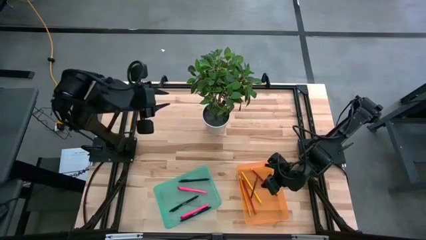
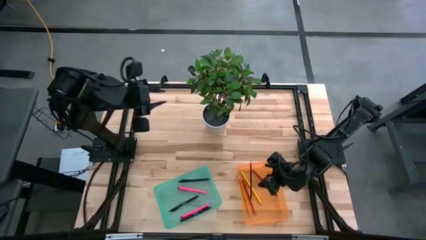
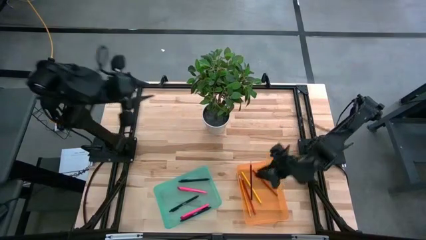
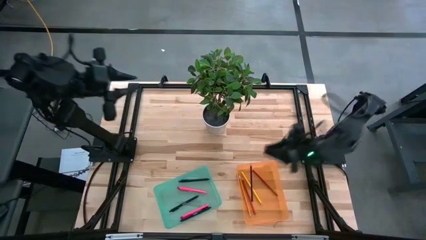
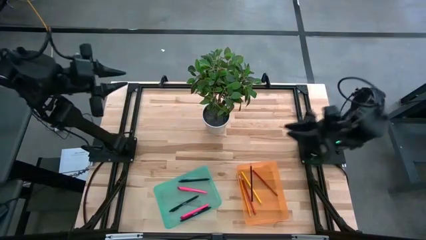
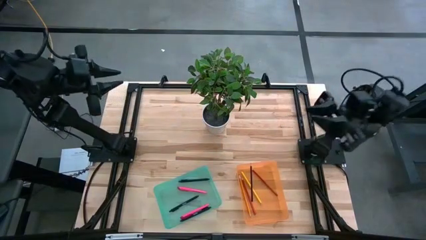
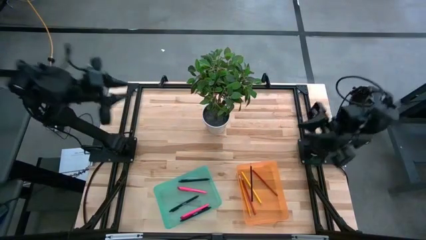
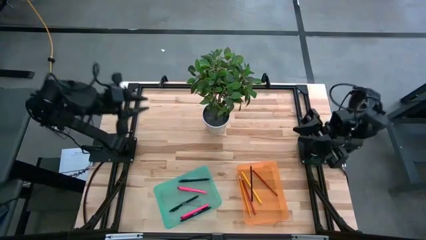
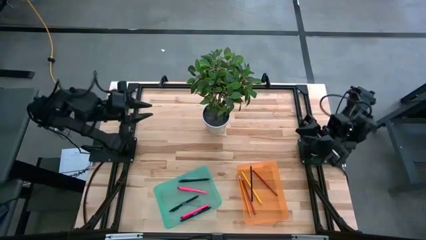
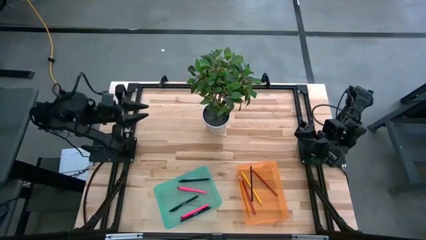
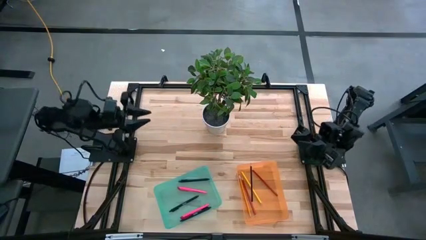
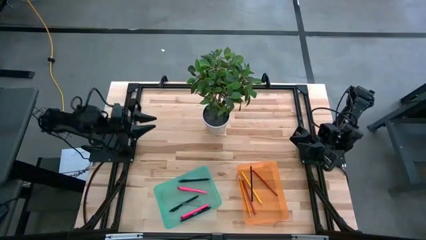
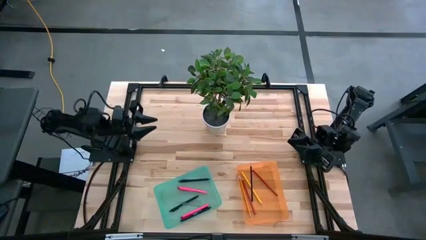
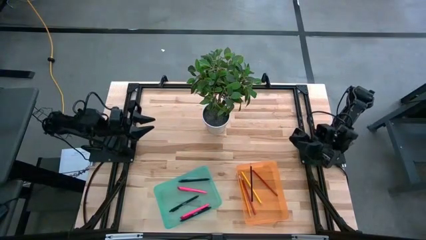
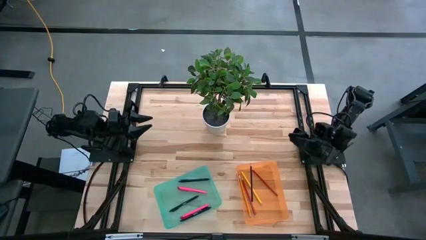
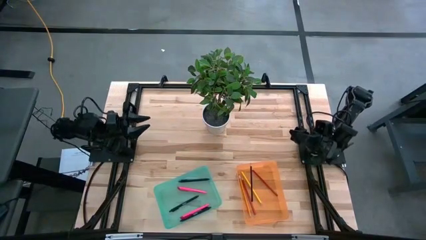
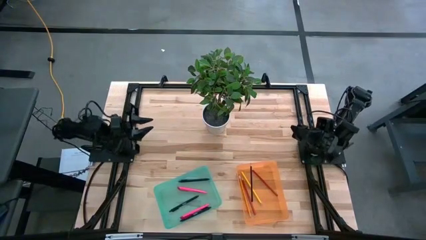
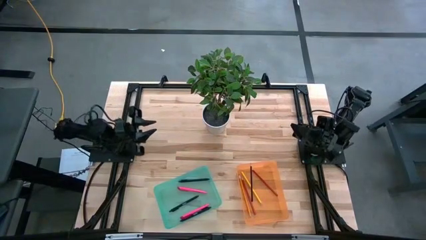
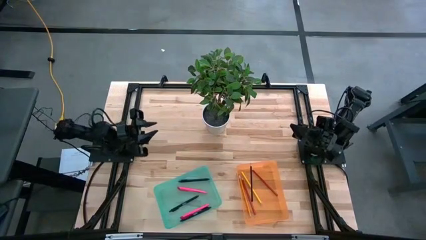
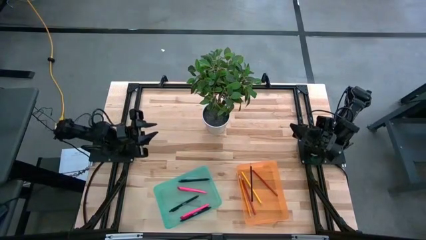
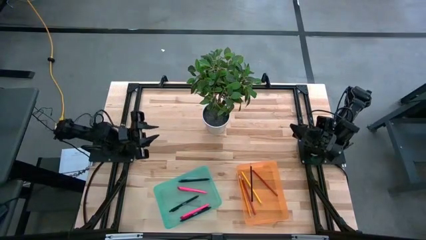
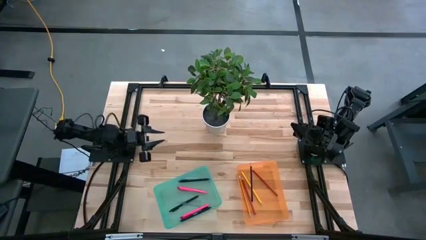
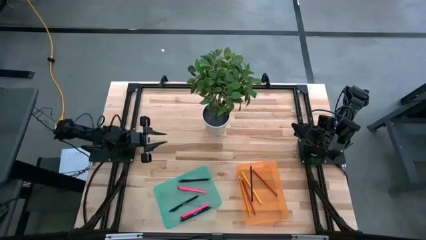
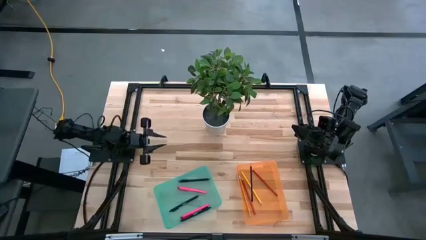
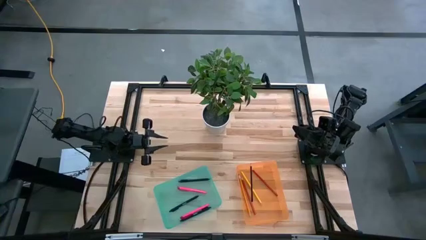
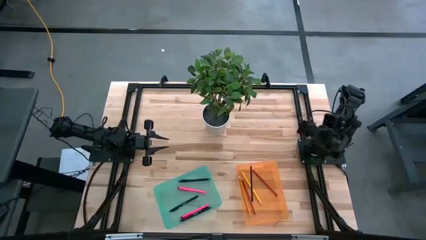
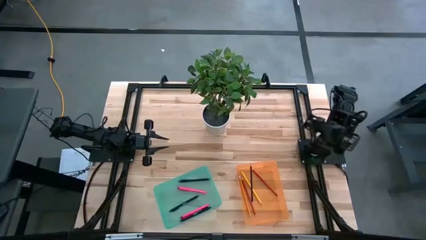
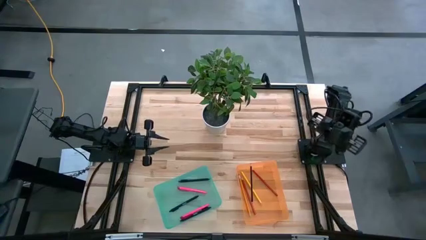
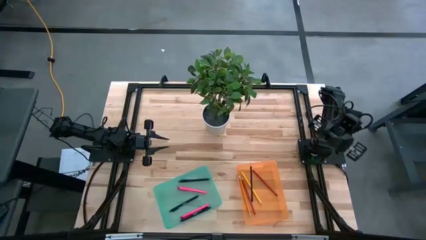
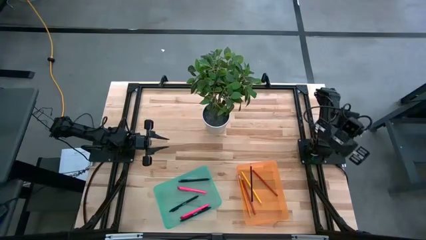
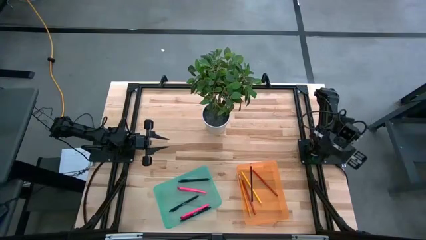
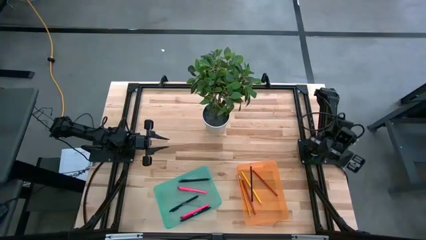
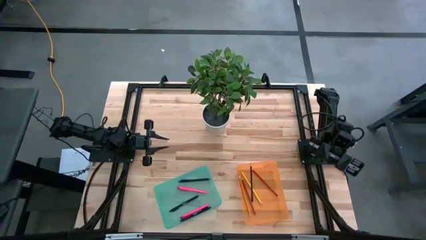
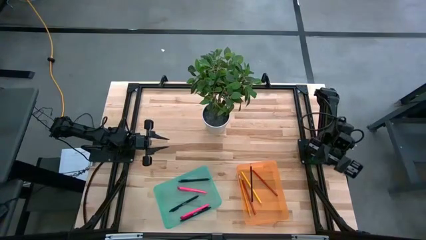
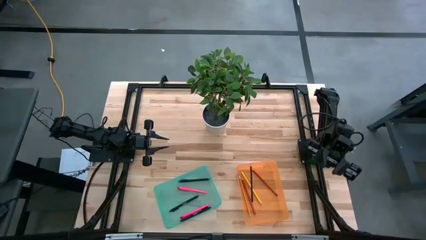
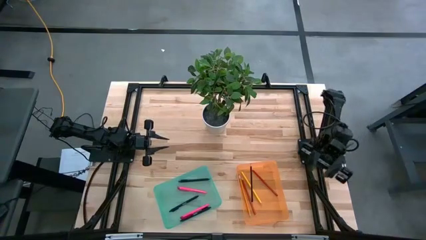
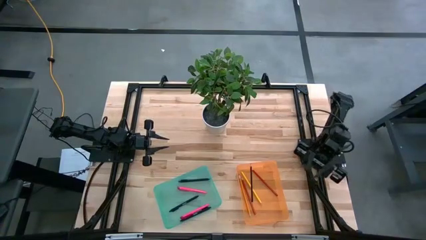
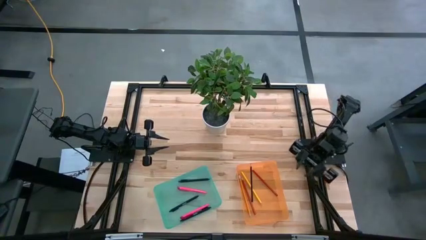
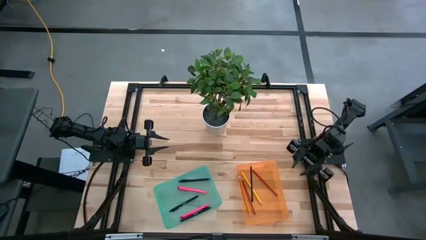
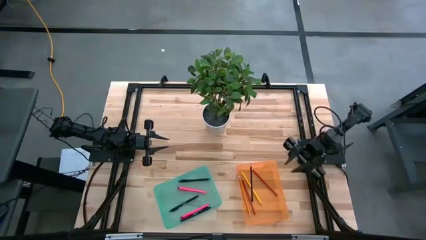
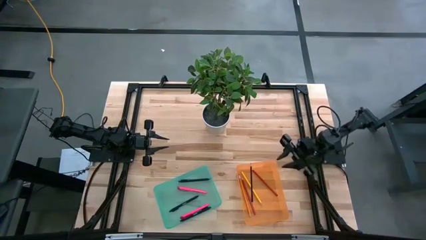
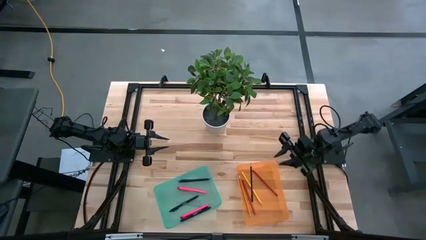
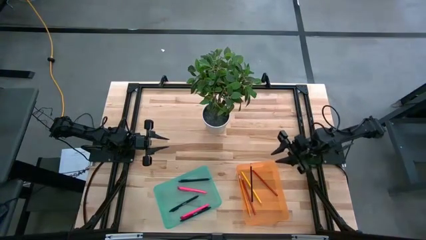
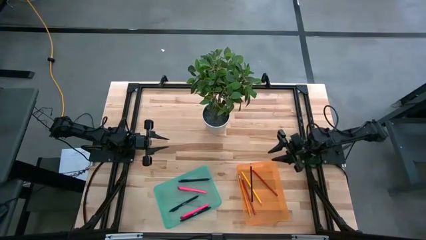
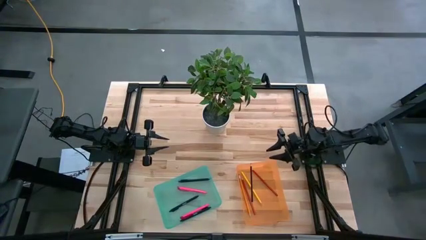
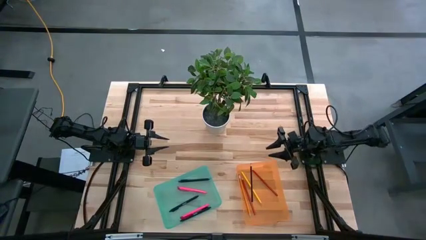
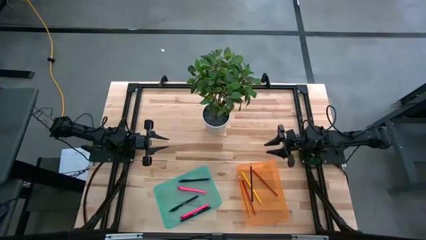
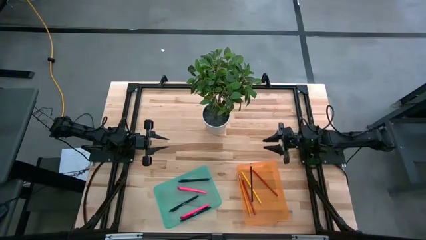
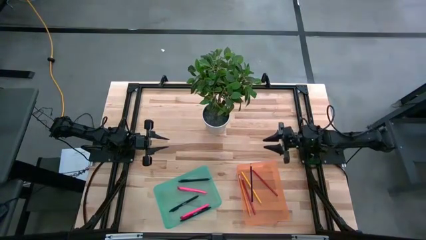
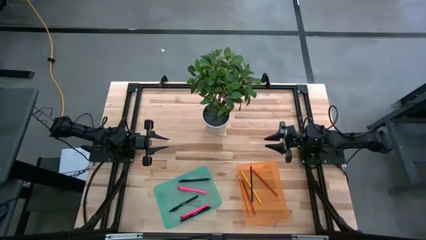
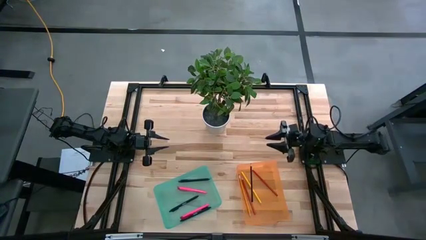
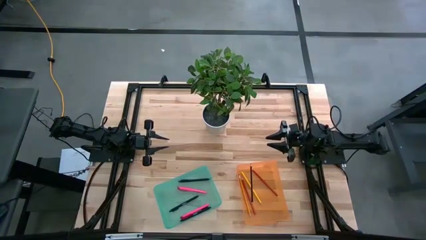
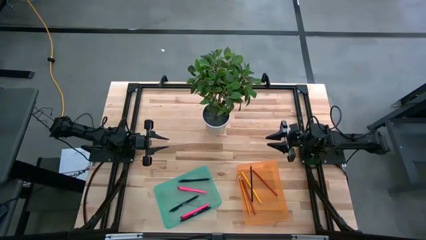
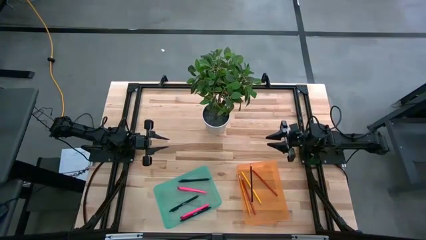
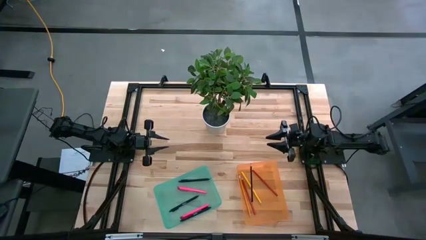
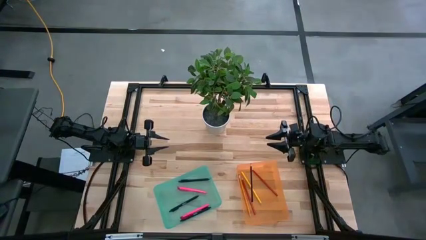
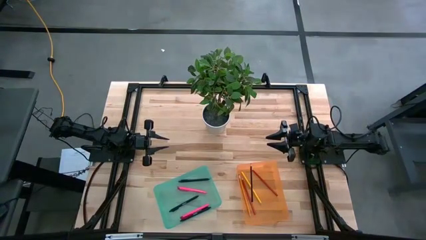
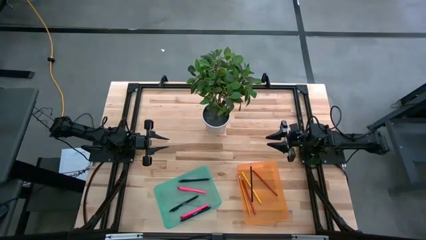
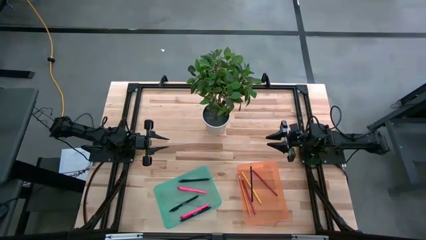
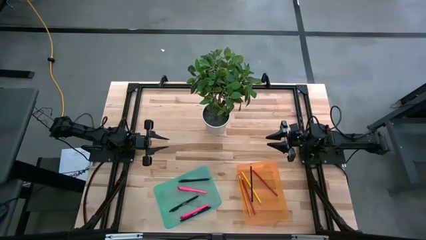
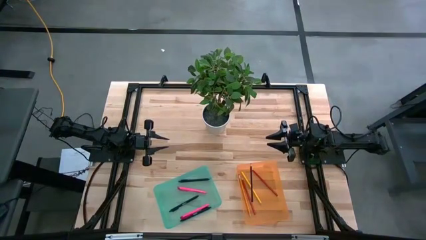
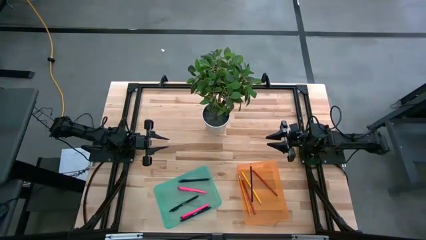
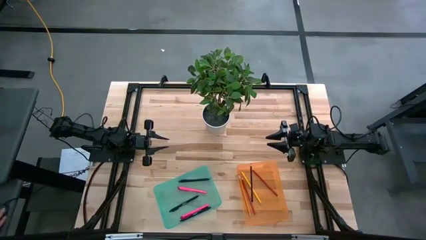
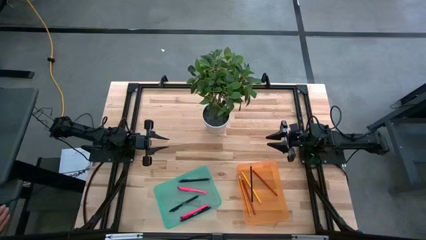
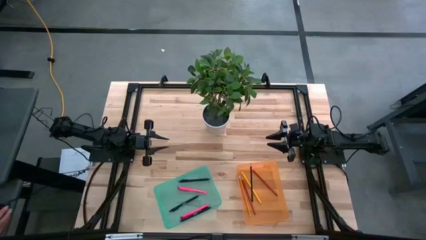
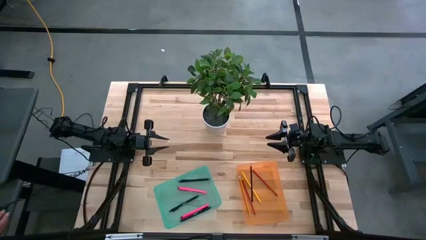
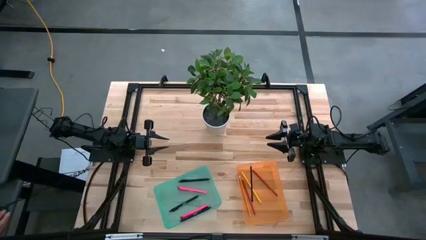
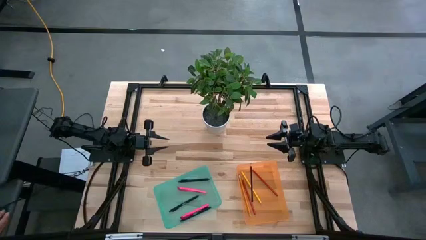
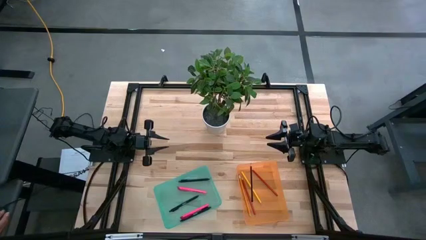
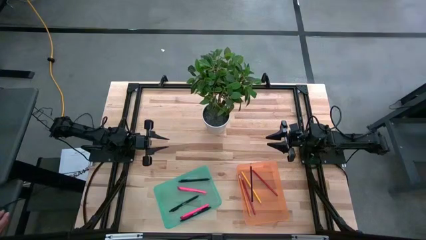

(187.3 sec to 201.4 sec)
Task: Sort pens & pencils
Return to Home Position
